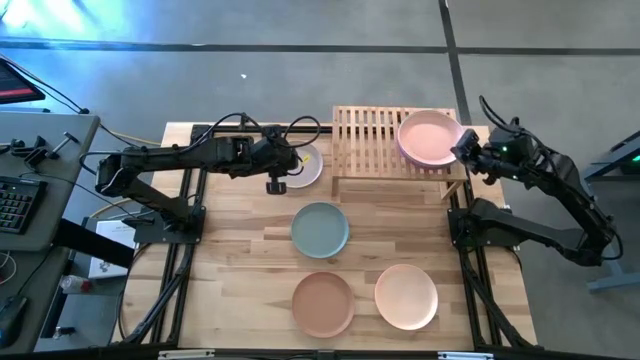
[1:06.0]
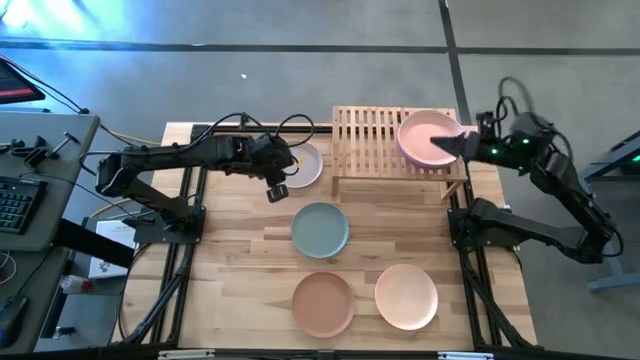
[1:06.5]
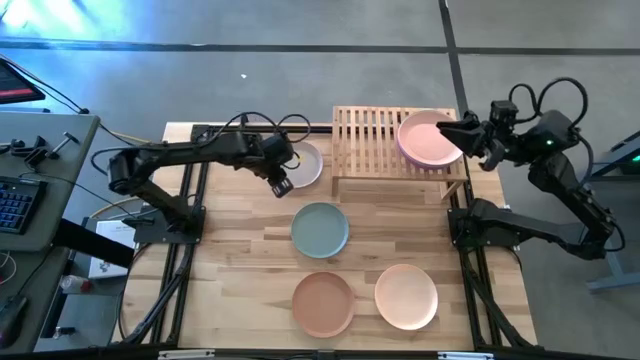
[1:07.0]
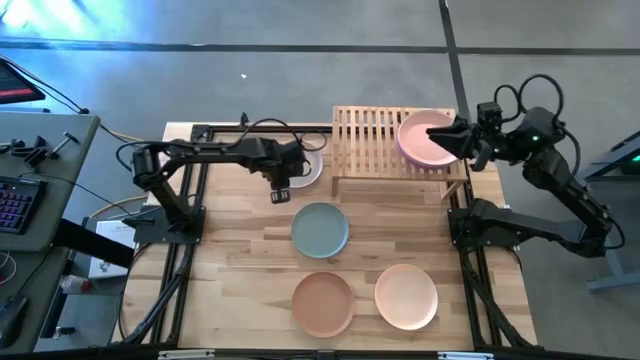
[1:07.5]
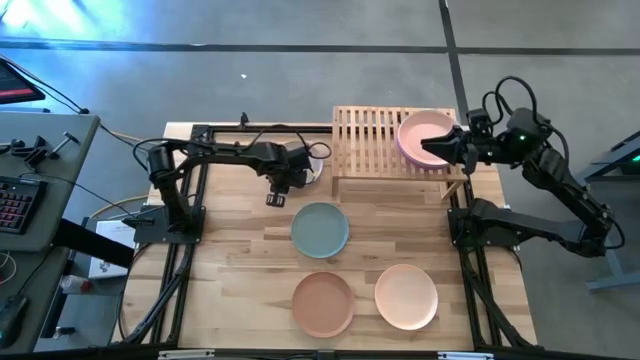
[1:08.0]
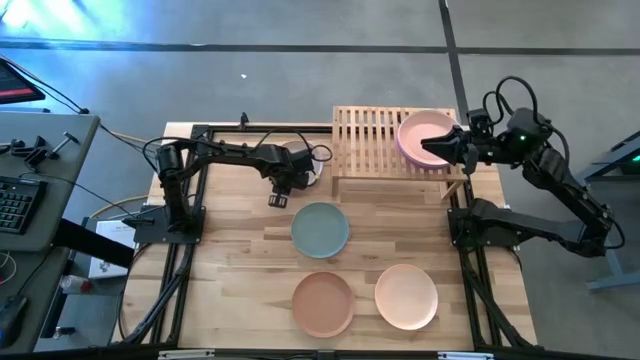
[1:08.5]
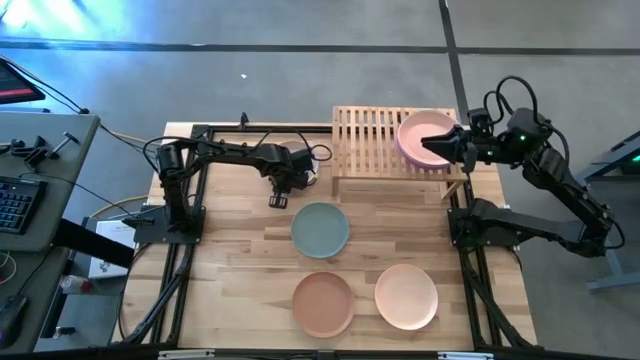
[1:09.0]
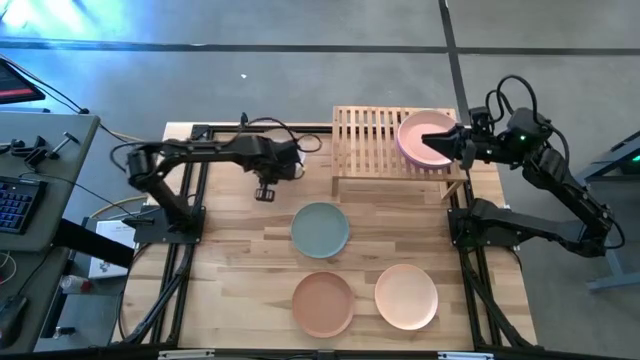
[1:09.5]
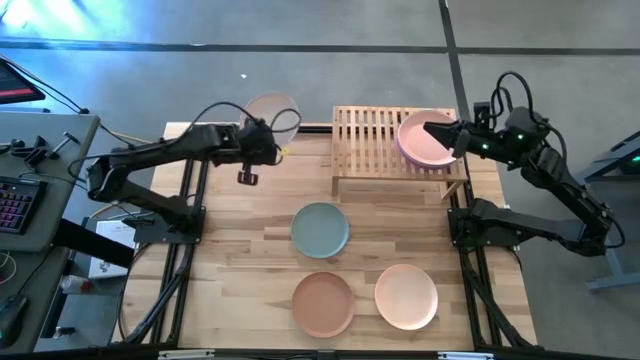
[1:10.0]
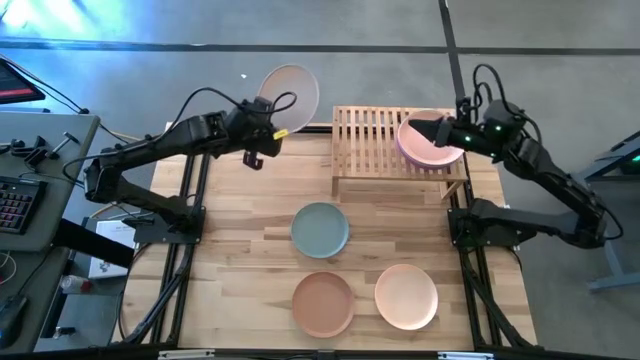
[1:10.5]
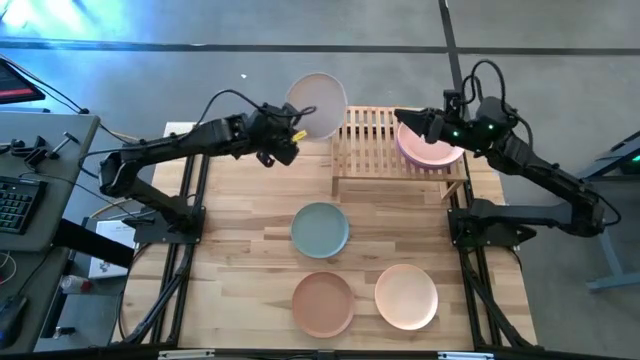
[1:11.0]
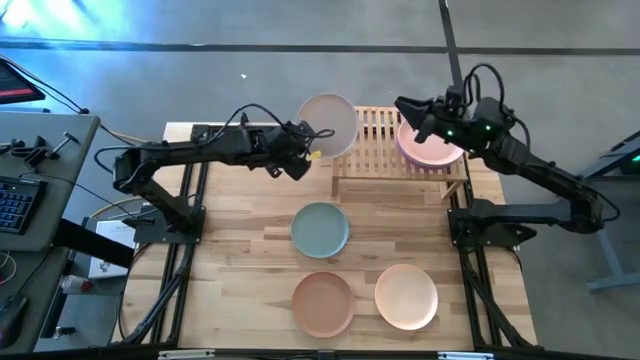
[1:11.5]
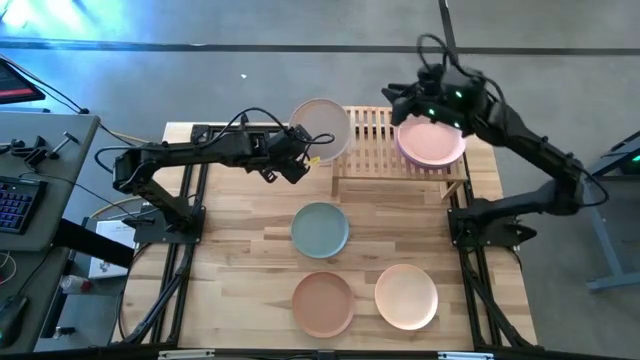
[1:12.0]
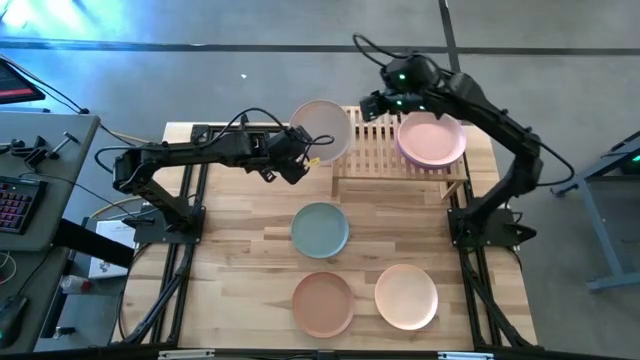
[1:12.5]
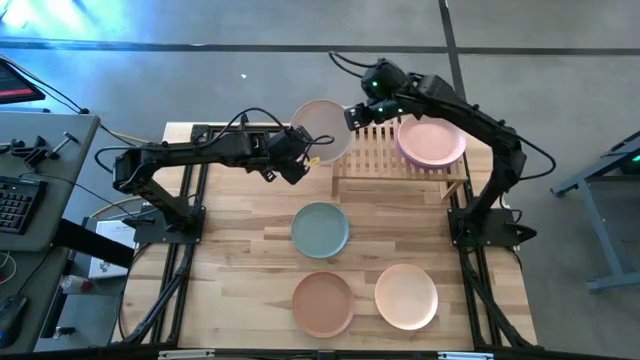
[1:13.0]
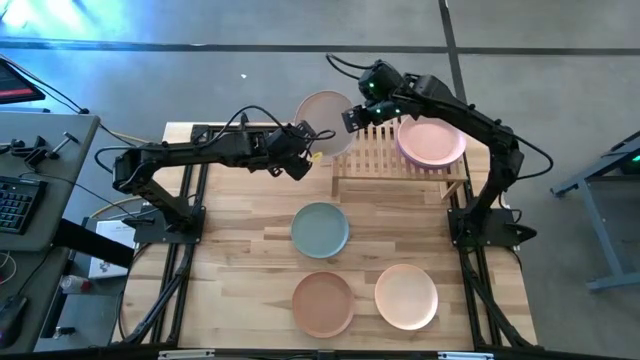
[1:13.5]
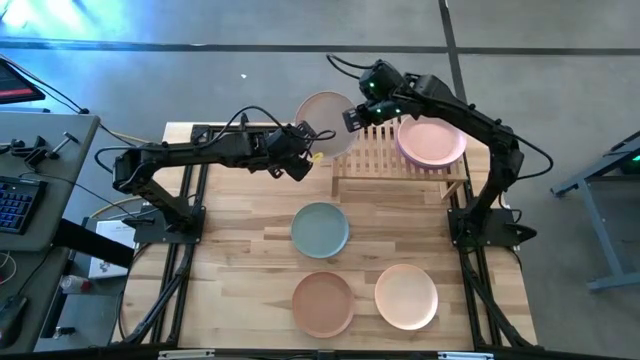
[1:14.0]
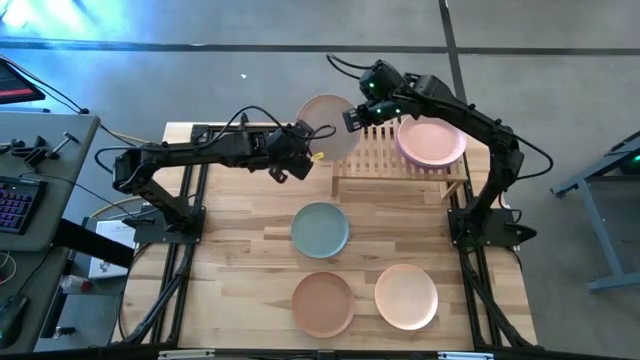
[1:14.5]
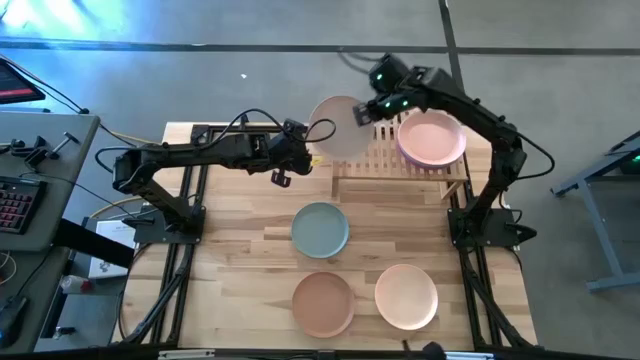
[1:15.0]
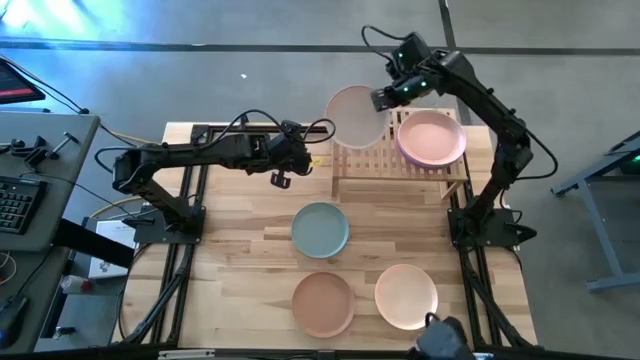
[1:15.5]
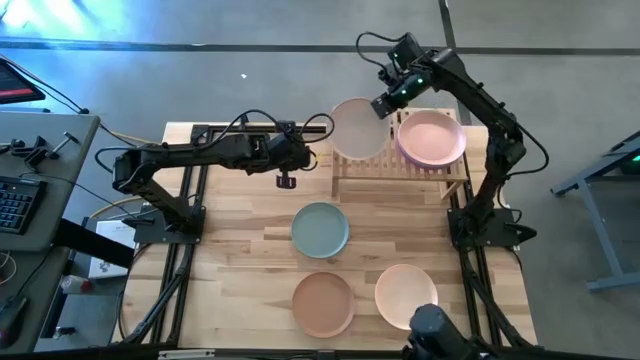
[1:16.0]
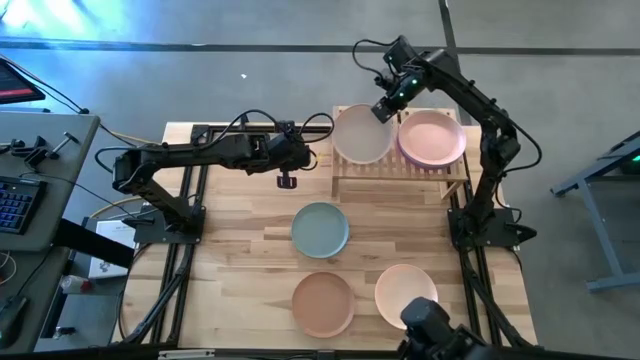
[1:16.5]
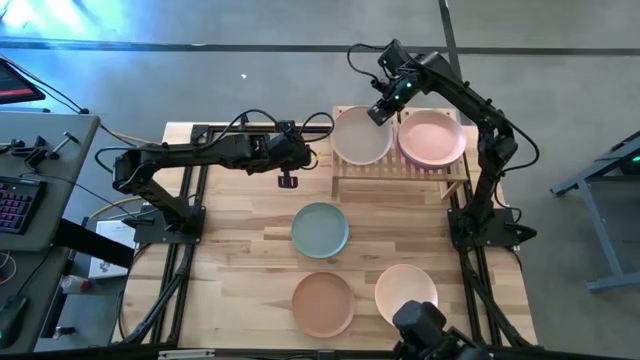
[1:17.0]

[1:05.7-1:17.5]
Task: Place and stack plates onto a shelf
Put the gray plate on the shelf

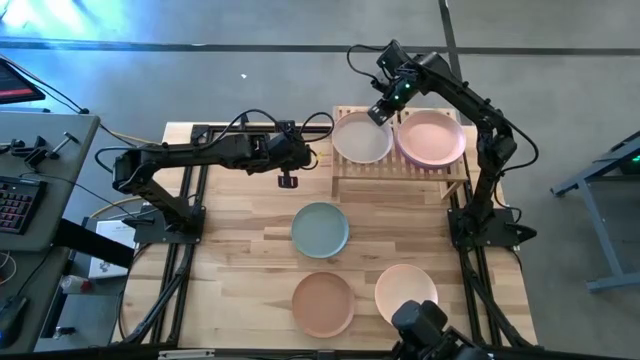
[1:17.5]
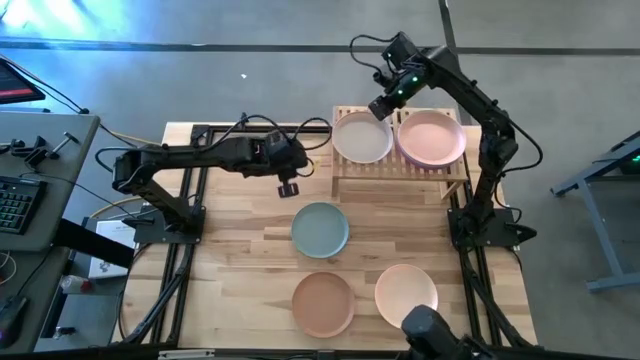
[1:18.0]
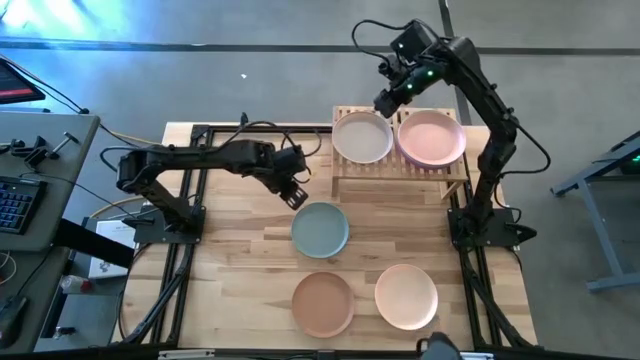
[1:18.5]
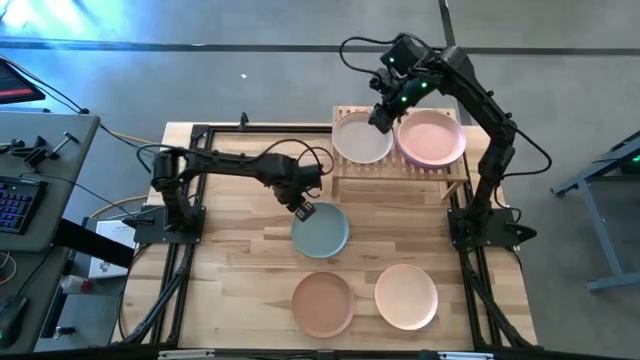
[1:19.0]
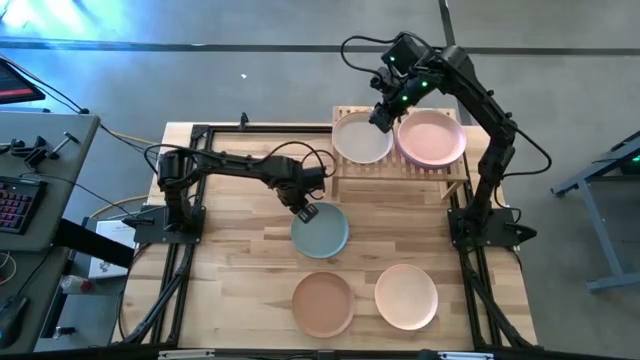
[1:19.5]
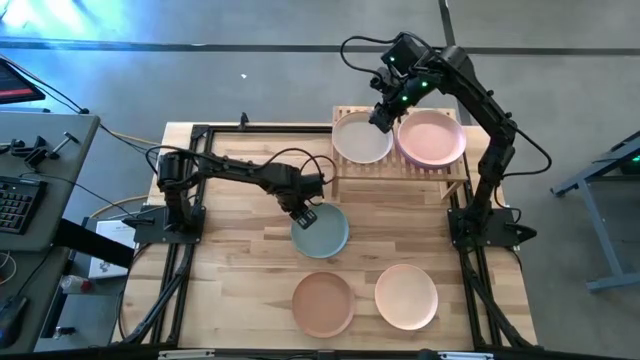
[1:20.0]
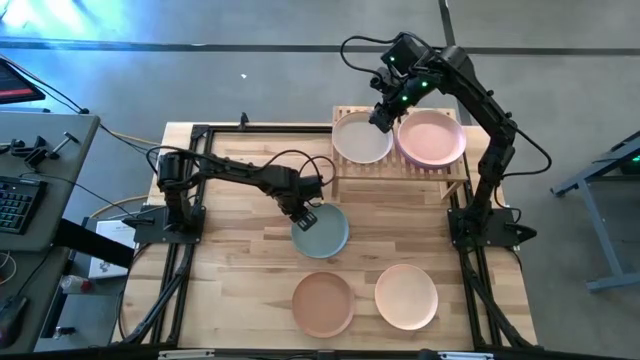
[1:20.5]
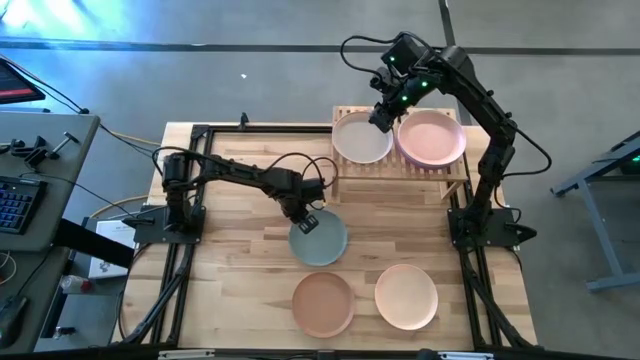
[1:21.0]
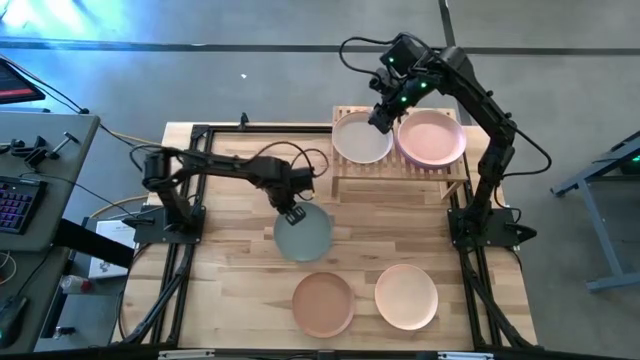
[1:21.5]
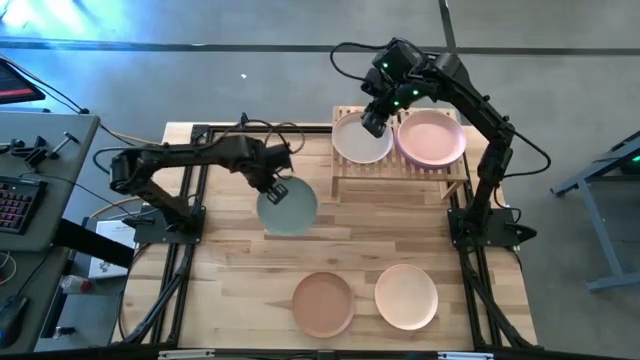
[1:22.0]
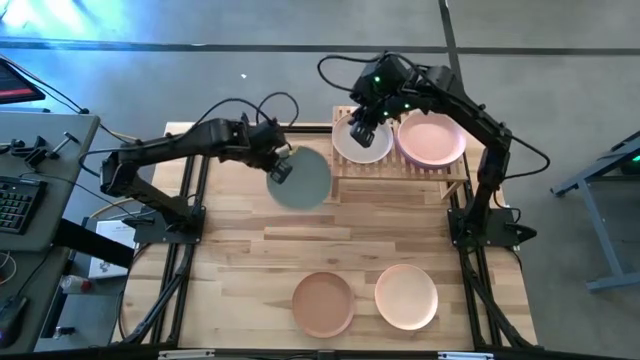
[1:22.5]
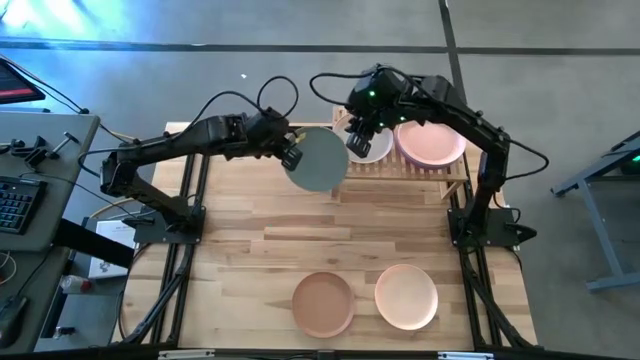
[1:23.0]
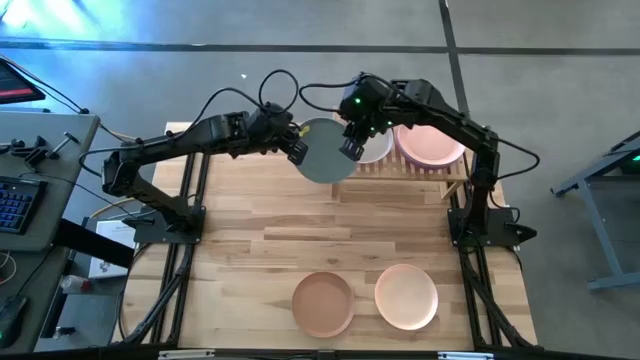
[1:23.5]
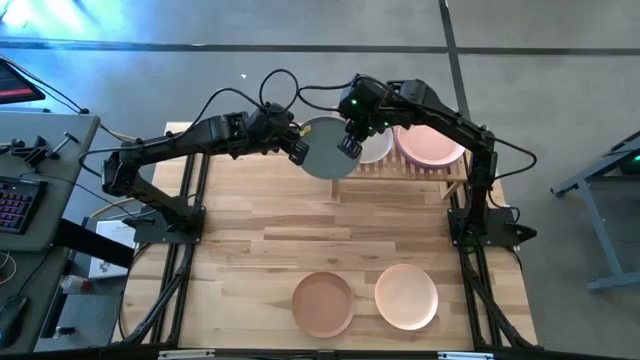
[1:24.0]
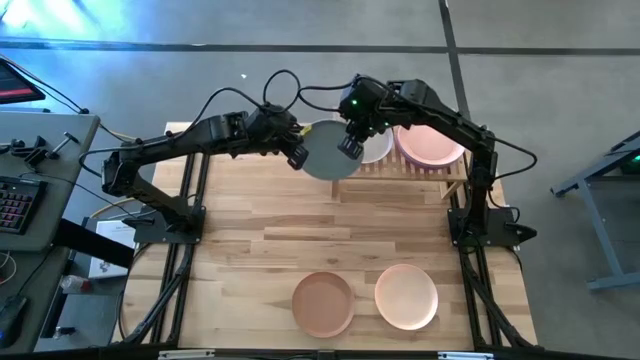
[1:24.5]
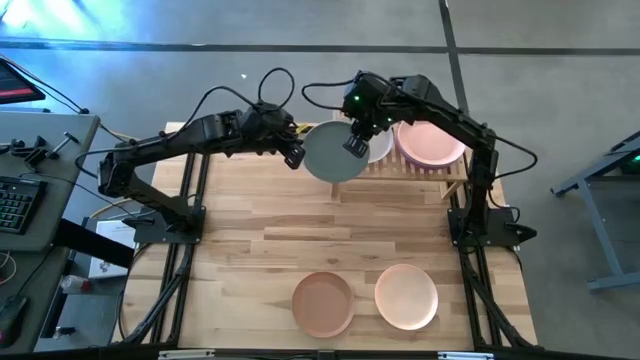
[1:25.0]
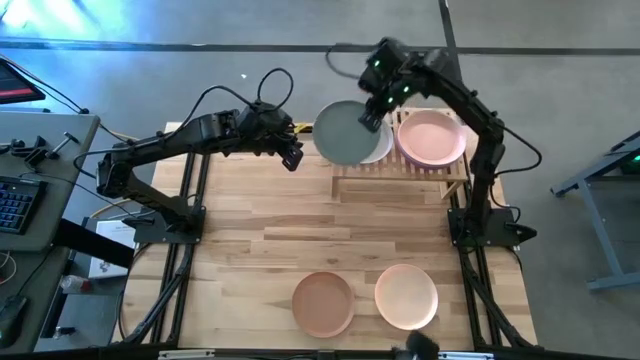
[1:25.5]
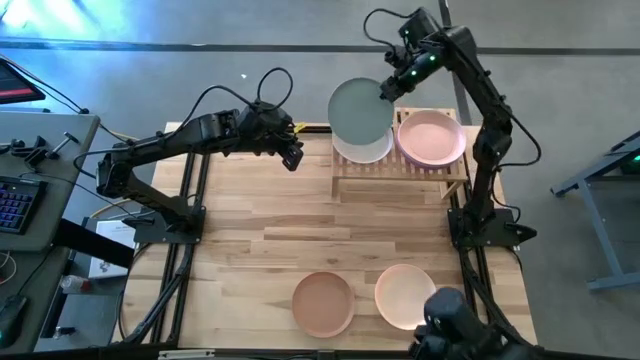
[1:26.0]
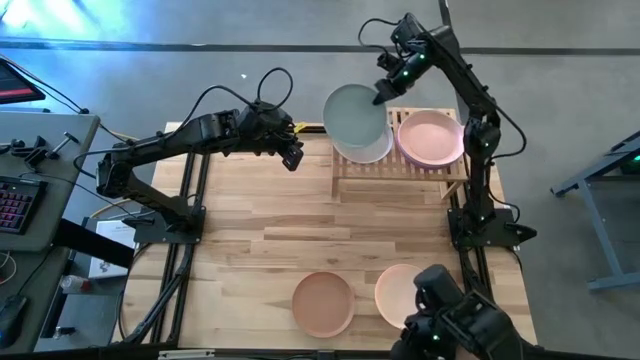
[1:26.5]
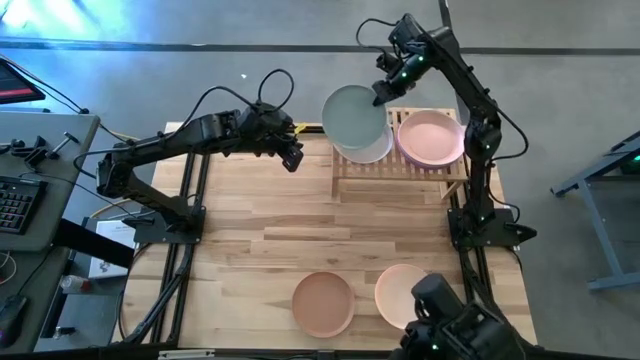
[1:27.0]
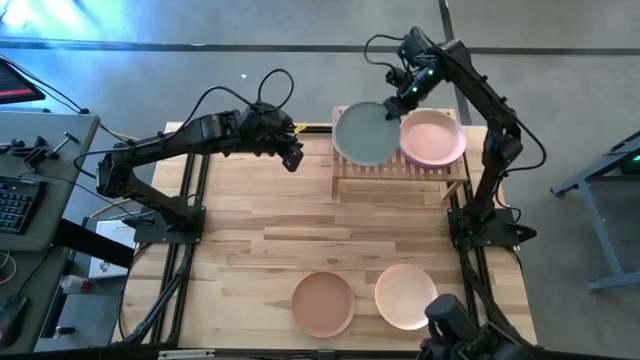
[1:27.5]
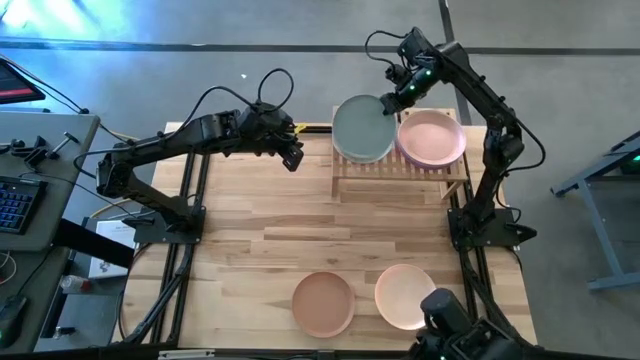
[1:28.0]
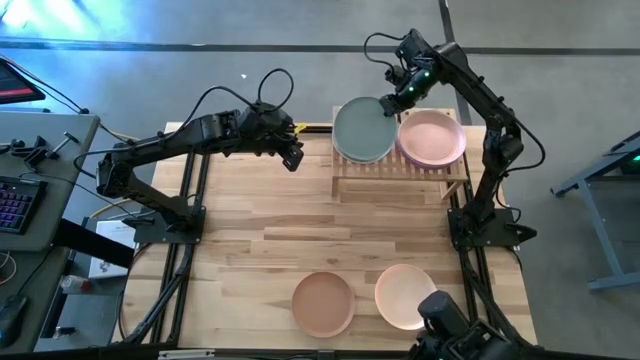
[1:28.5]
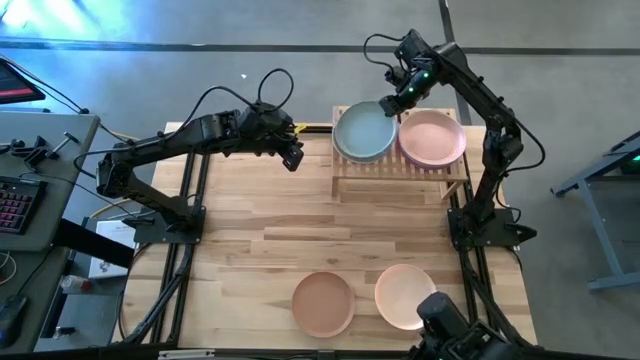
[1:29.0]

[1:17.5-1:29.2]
Stack the blue plate on the gray plate on the shelf
